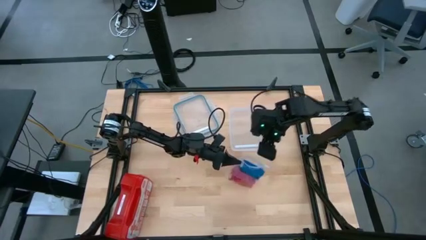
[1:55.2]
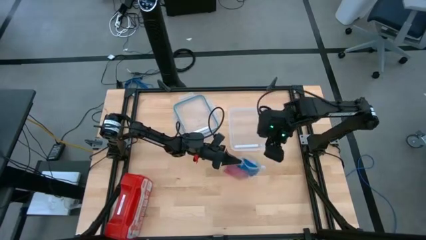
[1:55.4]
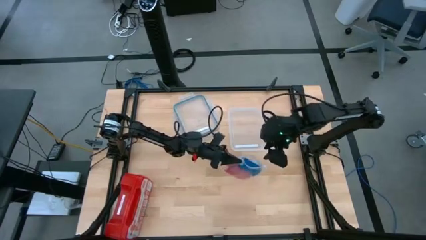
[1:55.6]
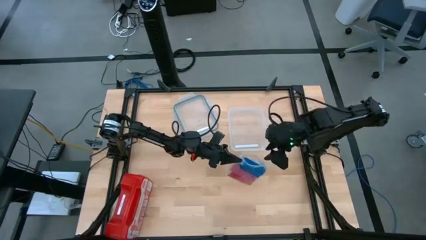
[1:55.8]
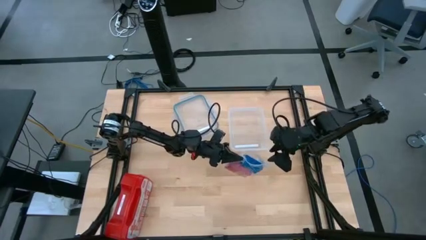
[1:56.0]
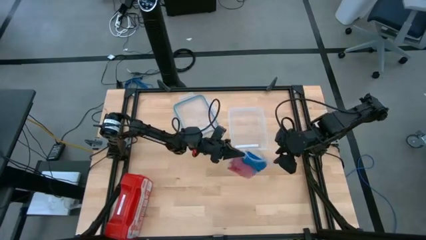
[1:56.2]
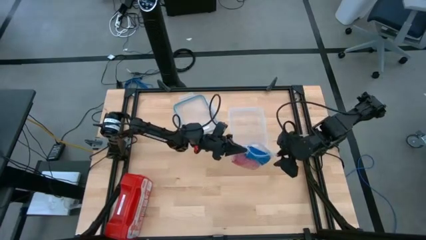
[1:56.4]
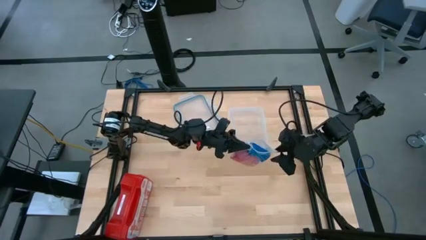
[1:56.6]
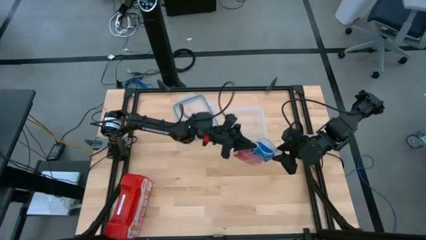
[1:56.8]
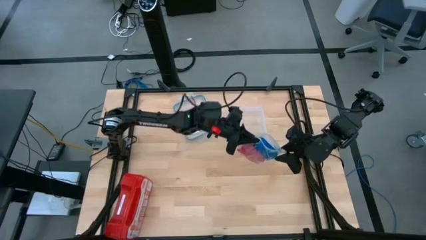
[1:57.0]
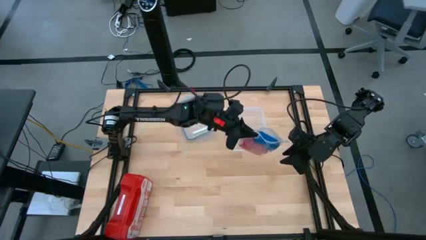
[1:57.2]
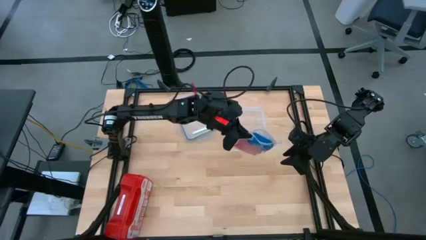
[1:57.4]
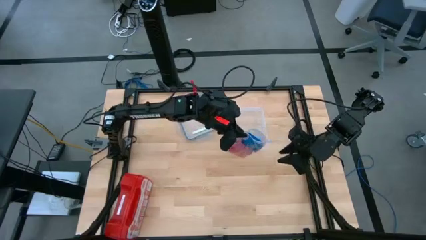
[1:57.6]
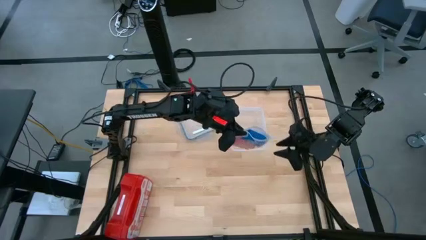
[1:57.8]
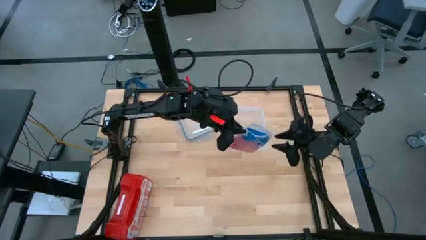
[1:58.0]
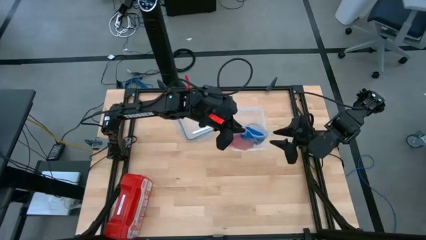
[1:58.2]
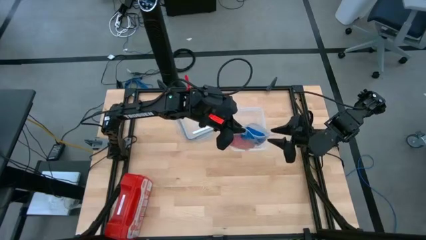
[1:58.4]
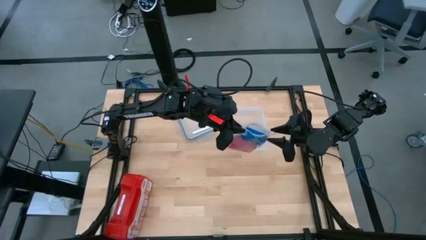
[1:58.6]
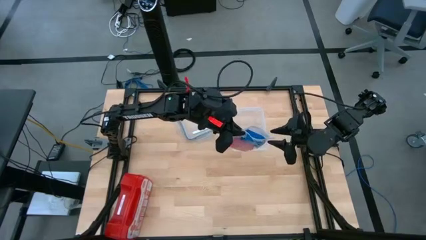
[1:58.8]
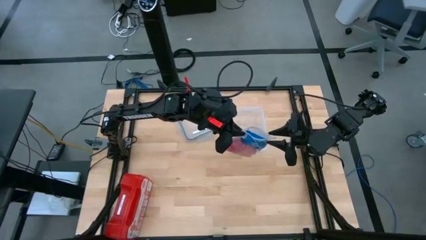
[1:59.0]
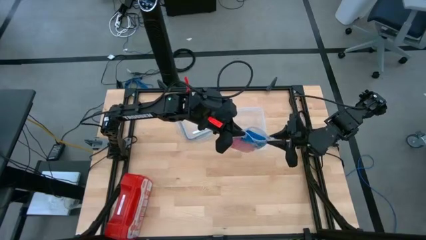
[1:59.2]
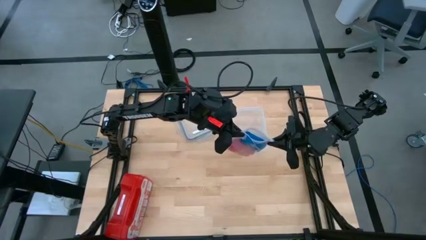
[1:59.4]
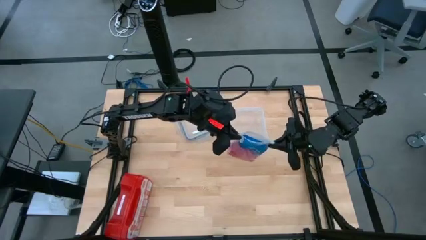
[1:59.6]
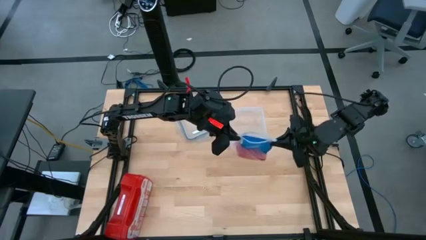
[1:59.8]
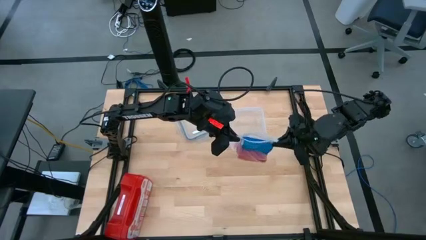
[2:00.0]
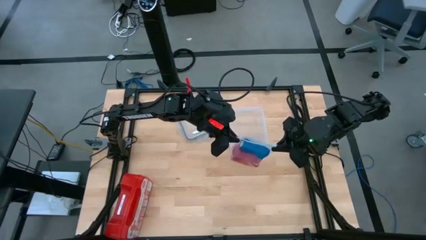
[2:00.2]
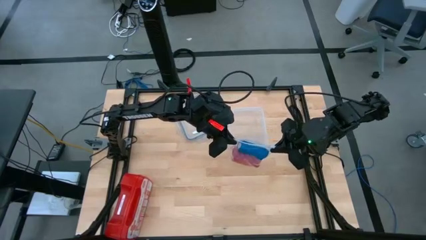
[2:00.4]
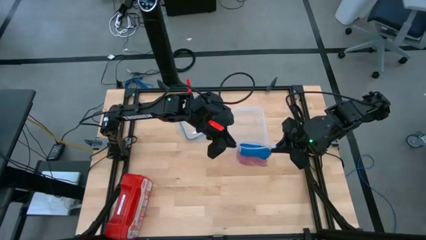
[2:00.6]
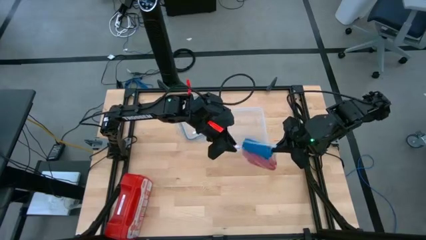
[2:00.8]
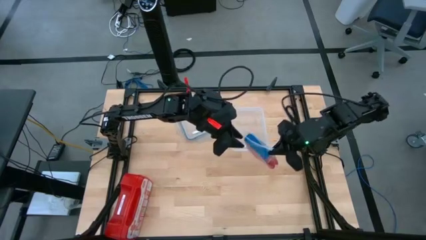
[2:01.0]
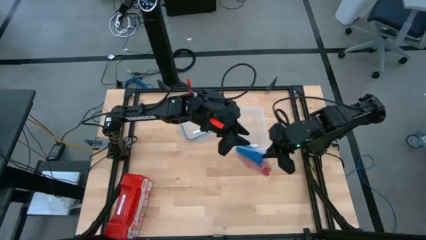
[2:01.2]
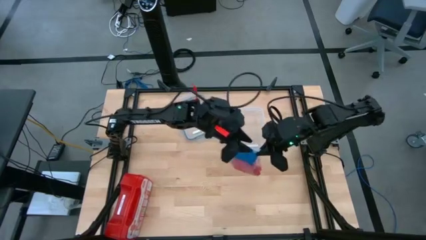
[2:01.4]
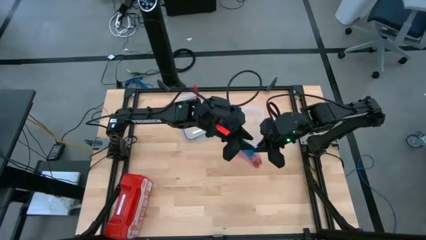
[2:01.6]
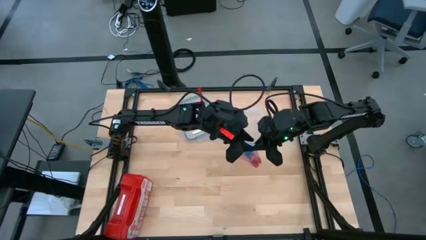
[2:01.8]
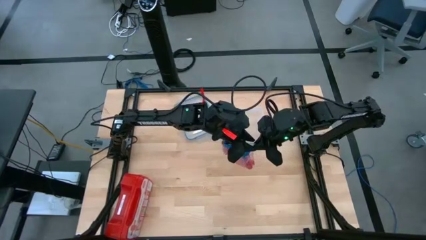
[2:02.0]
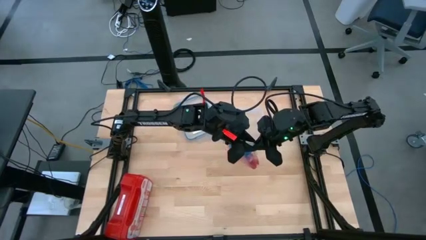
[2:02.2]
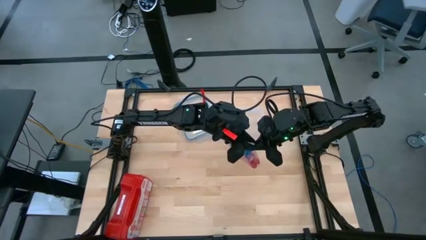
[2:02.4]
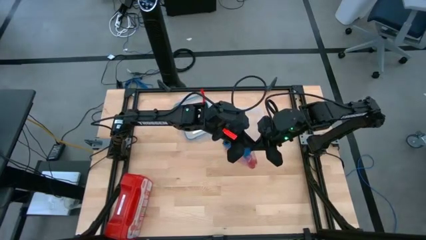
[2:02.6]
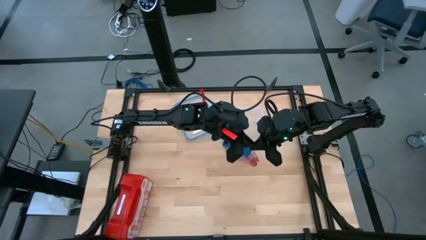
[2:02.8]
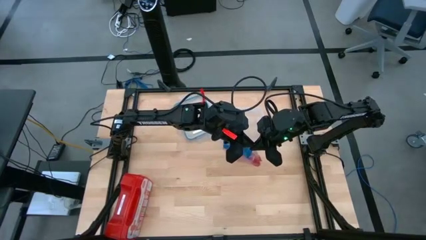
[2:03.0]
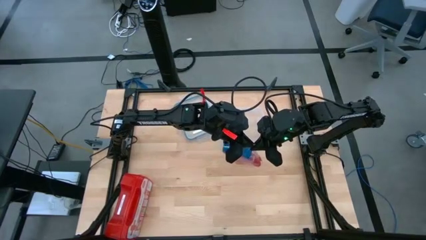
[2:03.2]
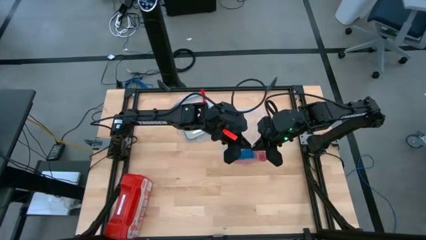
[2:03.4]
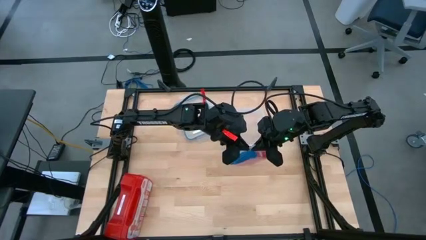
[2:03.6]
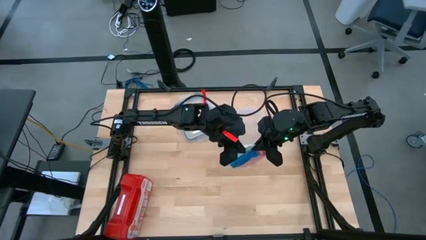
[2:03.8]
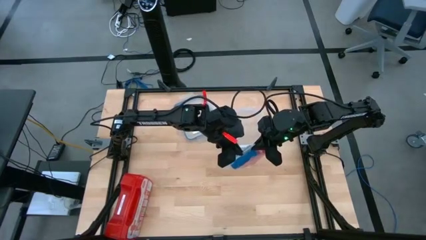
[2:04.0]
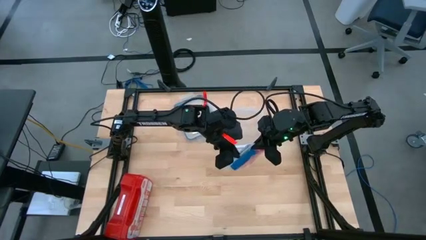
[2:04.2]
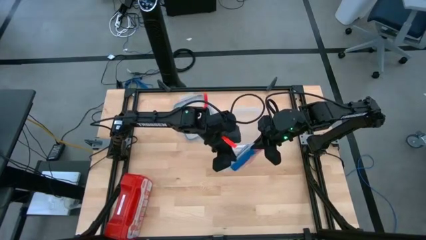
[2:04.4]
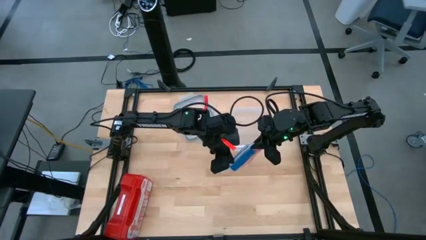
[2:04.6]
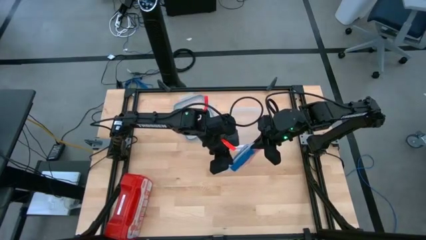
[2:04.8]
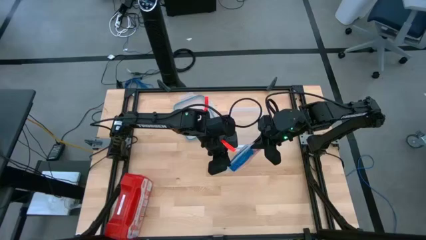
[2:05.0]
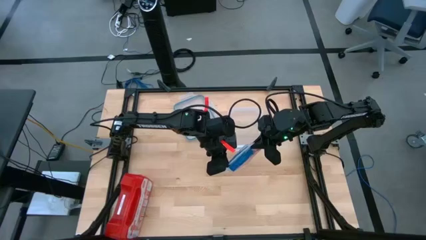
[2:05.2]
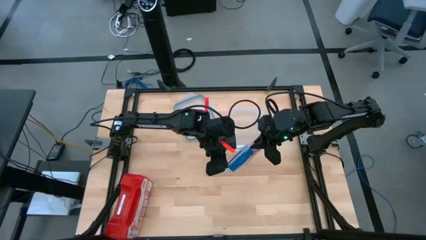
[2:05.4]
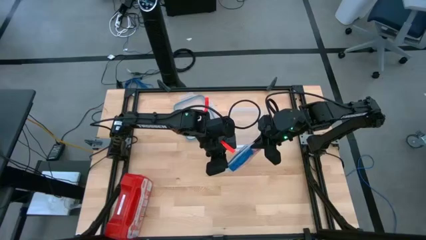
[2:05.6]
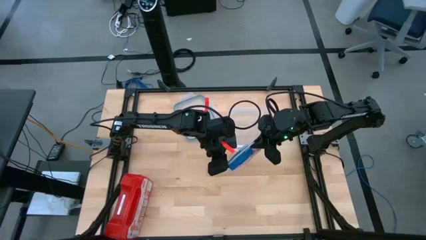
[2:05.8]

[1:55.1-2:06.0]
Task: Roll bandage
Close the transparent zip bag

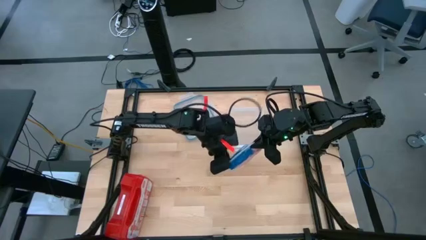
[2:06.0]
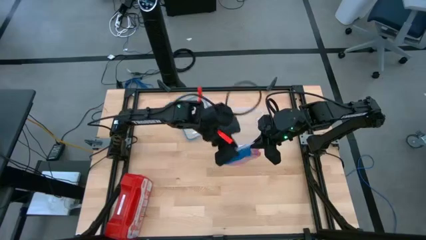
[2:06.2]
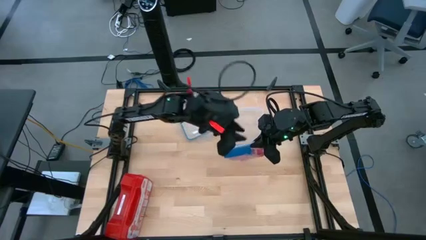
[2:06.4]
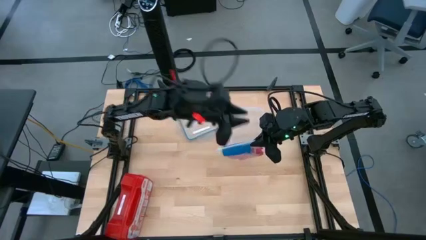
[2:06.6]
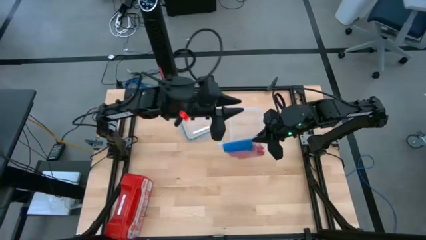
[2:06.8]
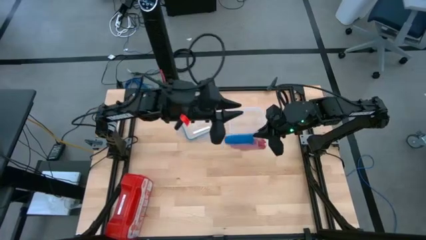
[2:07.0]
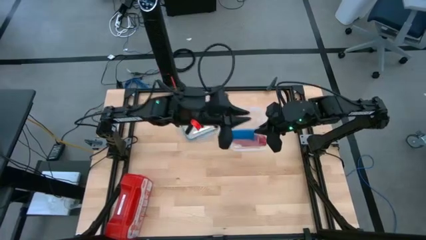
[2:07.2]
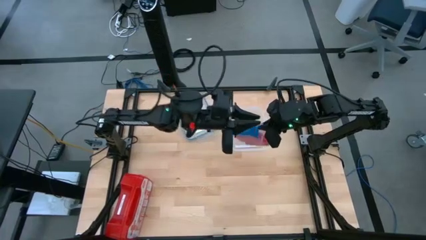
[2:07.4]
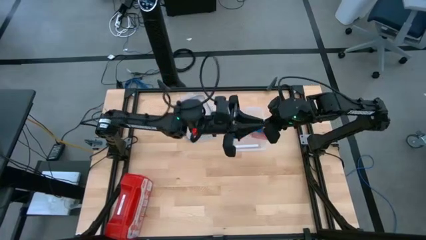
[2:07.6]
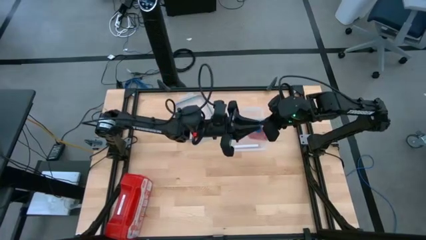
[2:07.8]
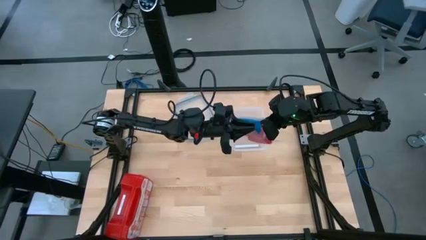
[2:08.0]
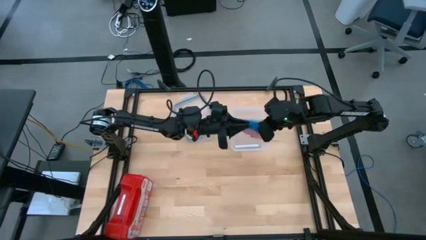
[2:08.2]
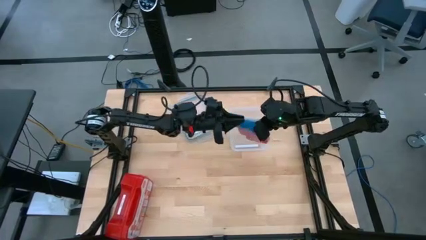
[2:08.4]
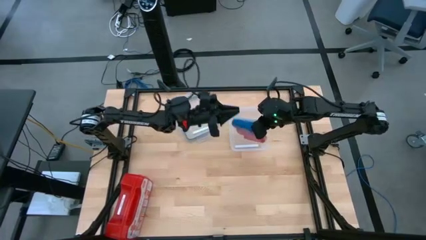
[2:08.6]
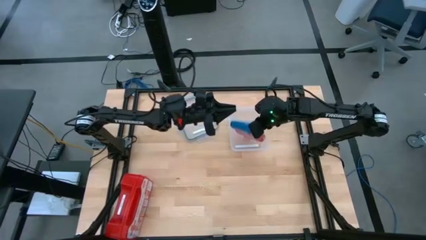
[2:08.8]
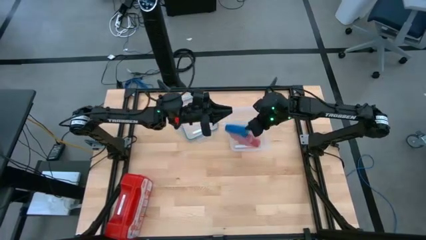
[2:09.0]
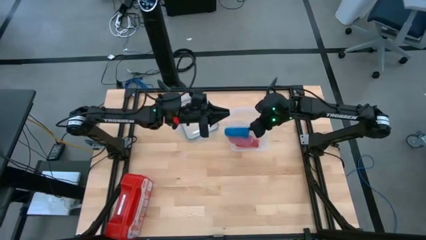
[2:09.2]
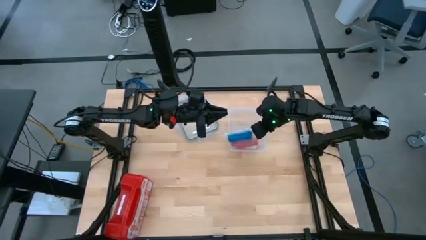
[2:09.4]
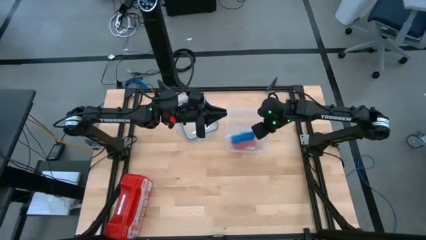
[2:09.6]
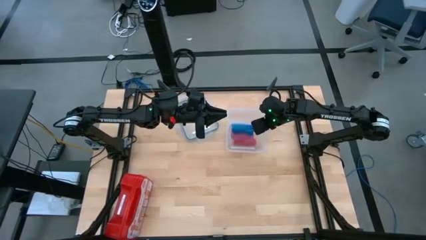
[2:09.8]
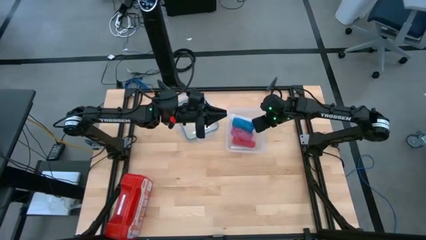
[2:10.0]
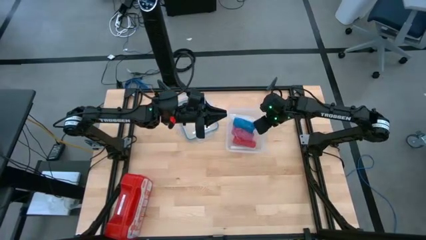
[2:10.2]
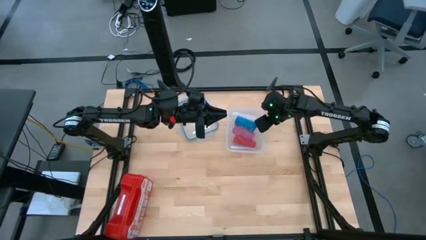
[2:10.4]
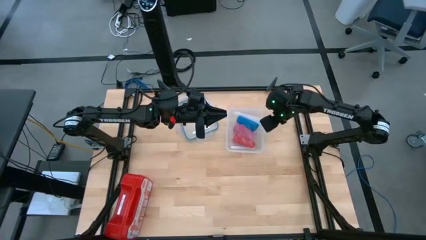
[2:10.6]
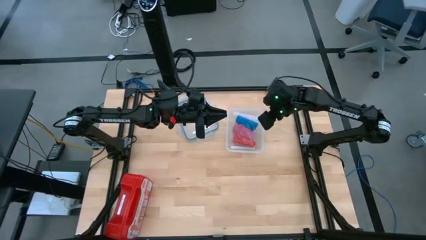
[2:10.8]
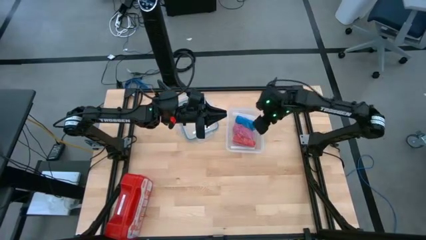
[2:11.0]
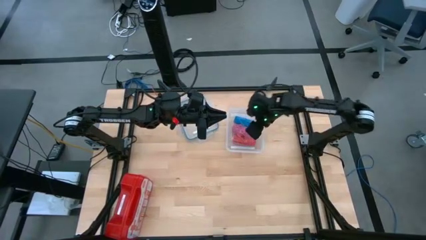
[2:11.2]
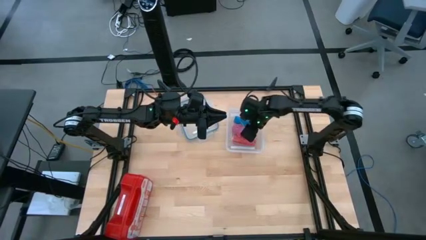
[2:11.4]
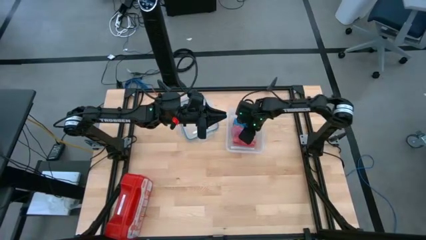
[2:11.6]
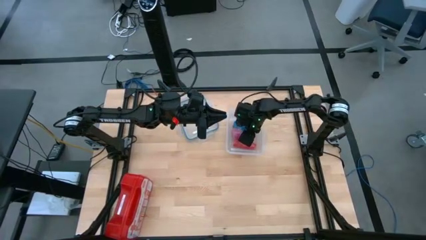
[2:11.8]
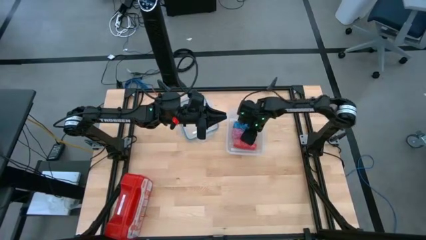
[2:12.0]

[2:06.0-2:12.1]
Put the transparent zip bag into the tupperware
